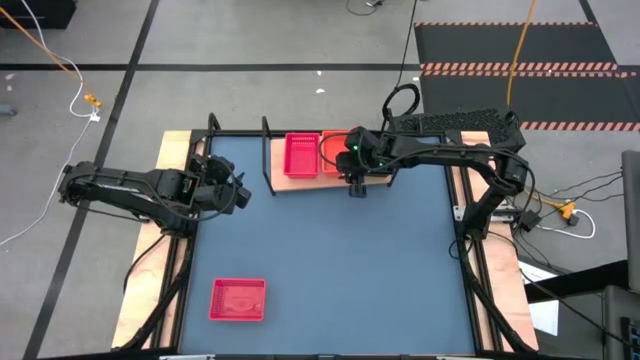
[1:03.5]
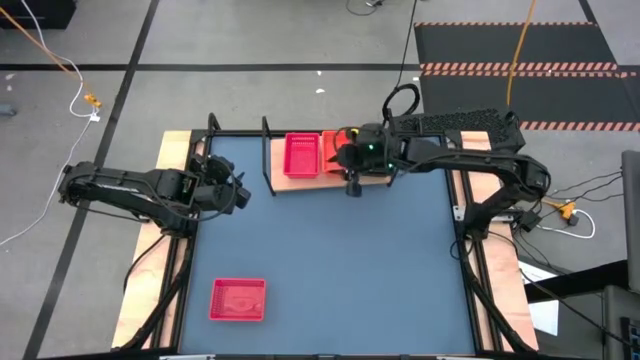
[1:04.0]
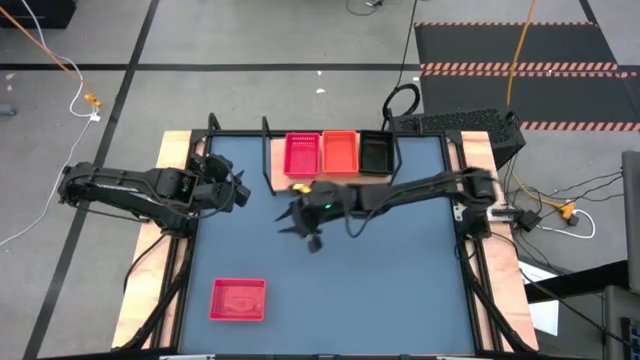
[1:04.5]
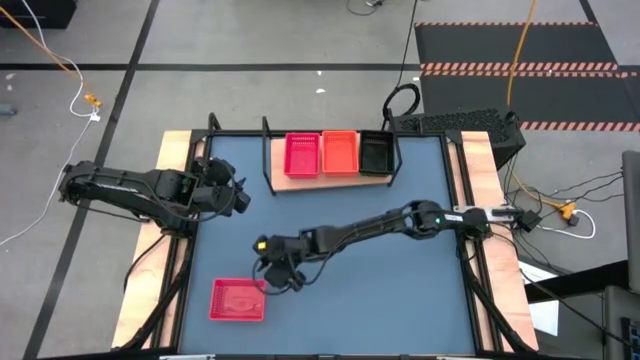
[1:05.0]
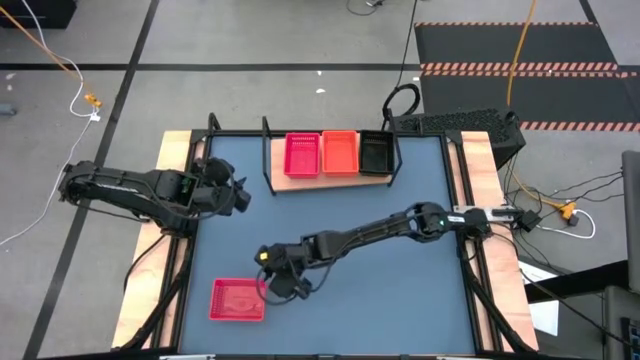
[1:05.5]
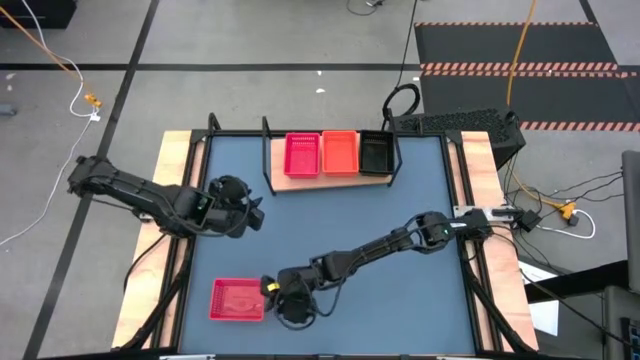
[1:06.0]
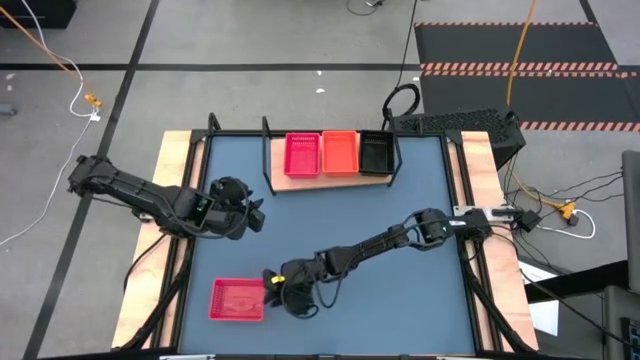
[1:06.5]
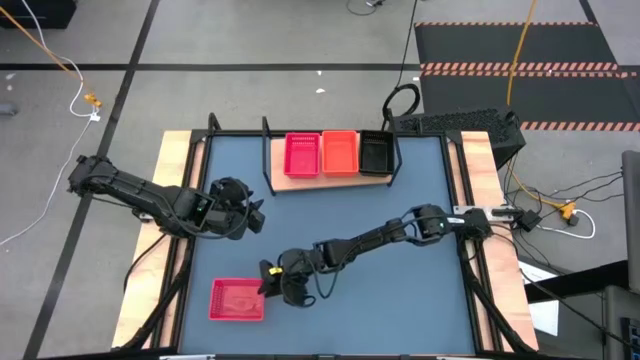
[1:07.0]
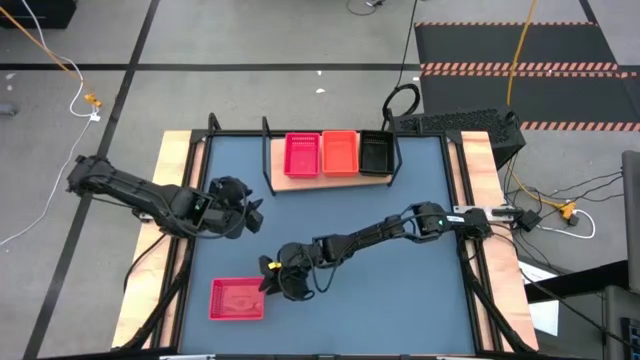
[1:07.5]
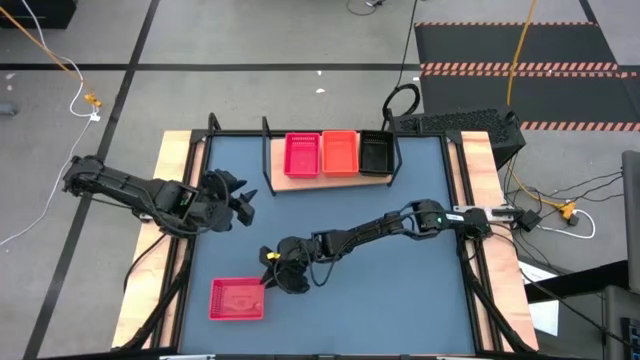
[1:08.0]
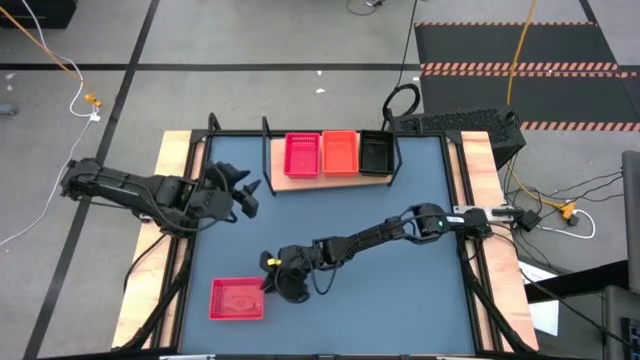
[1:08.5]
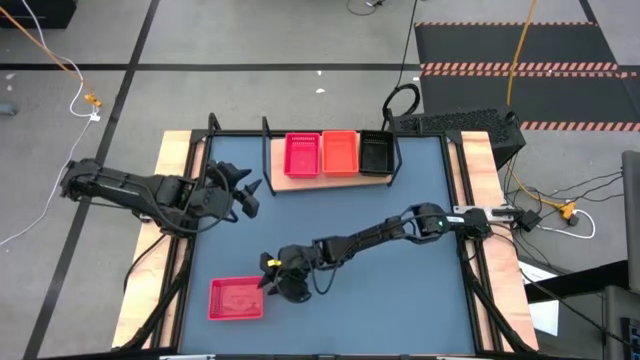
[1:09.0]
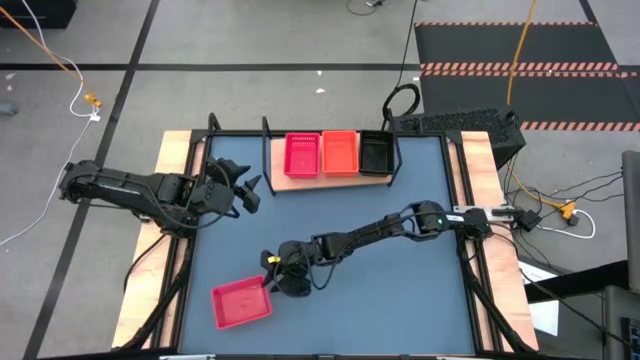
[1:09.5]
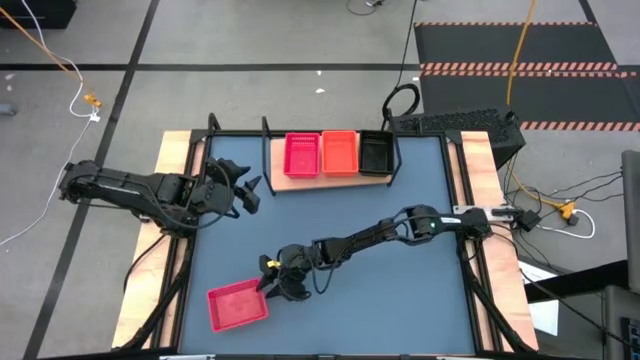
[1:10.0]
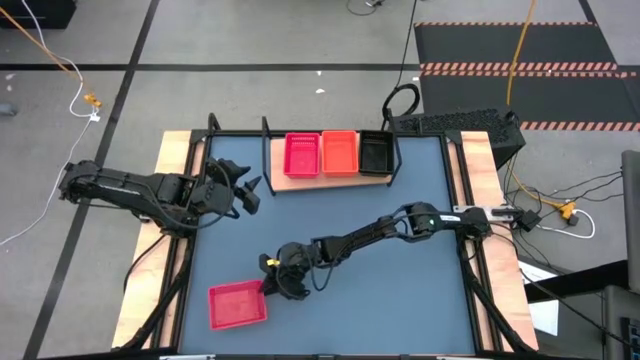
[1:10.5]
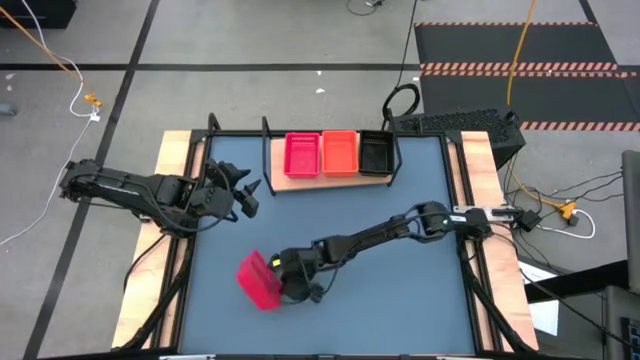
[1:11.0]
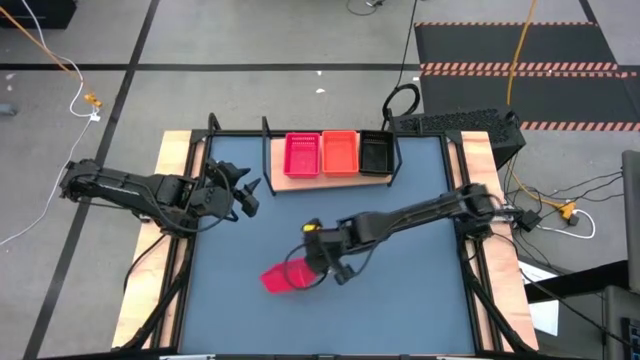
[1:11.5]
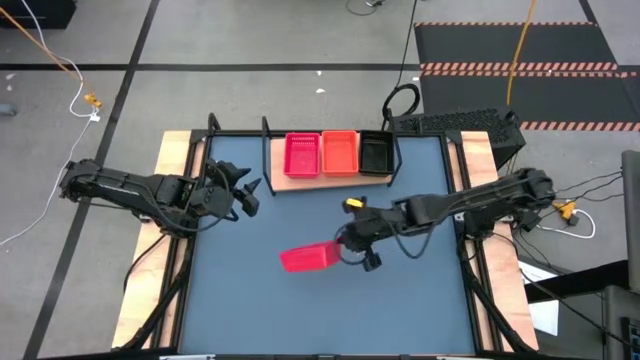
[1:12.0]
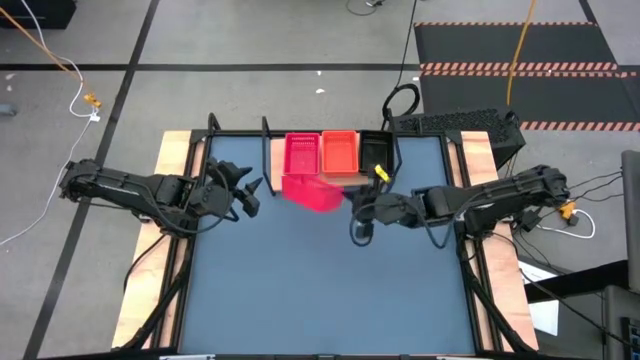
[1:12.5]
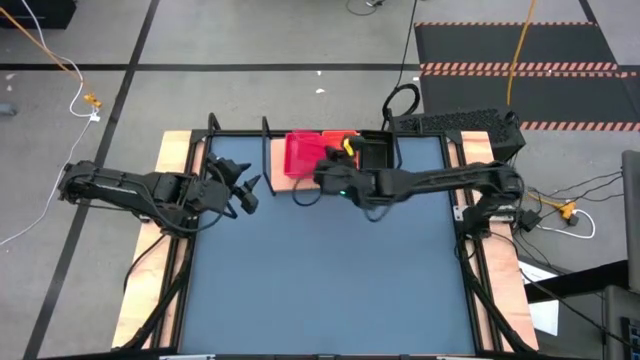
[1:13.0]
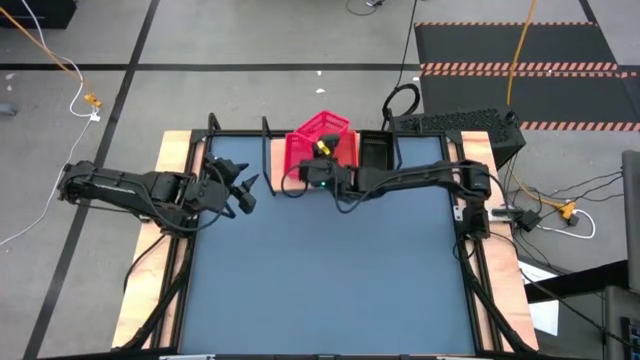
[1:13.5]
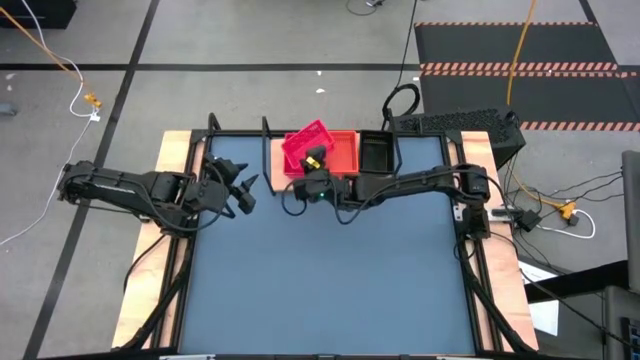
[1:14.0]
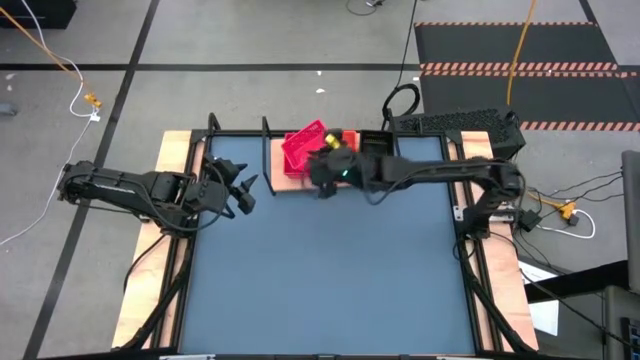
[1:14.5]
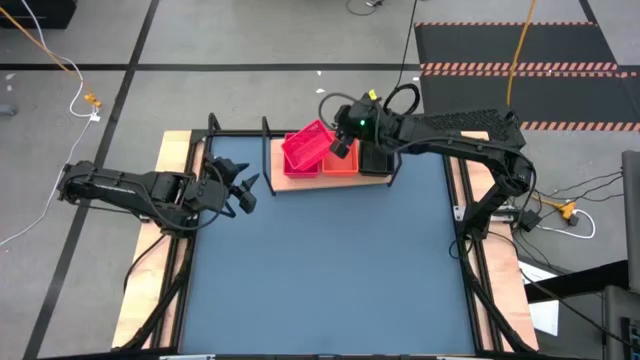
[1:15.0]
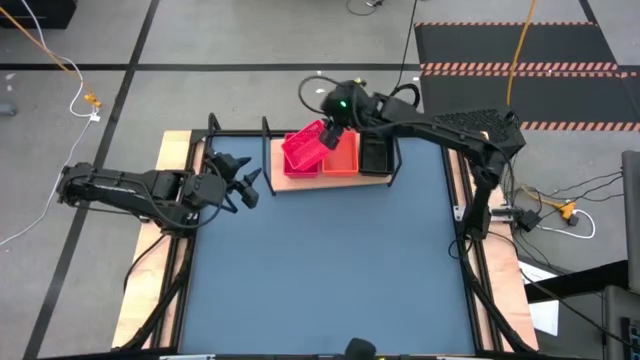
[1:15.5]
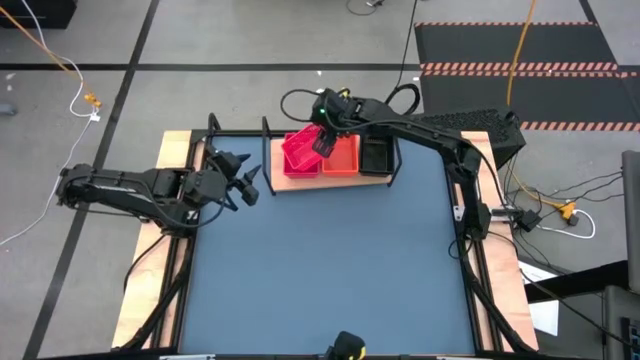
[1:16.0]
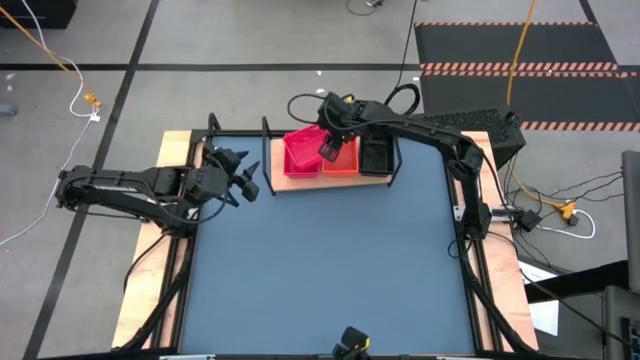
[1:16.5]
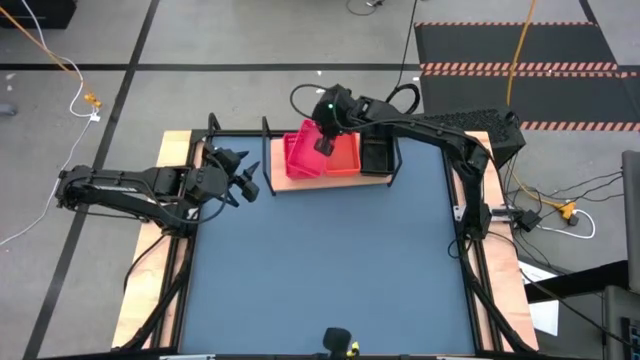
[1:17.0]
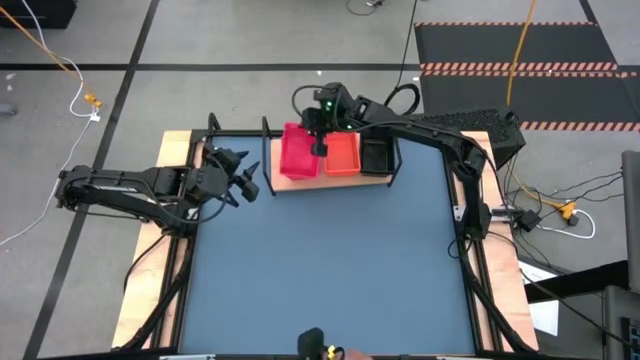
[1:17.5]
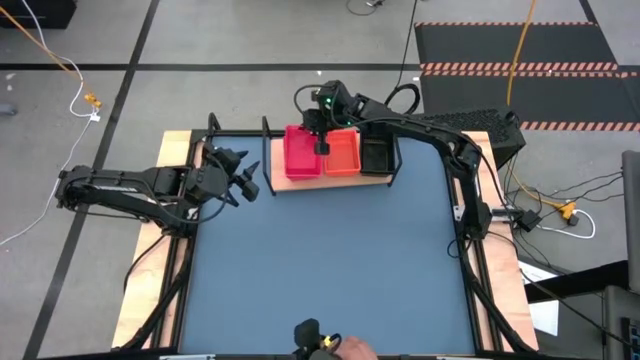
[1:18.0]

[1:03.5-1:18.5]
Task: Stack baskets on shelf by color
Stack the red bin on the red bin on the shelf

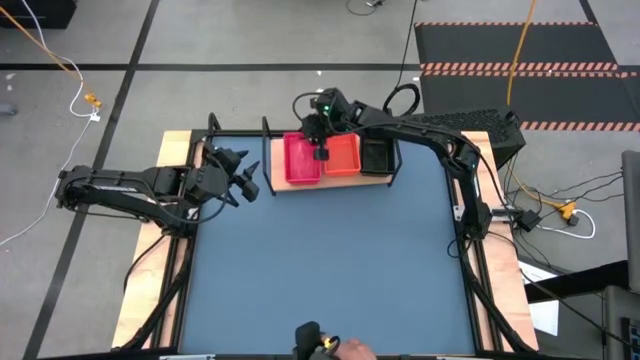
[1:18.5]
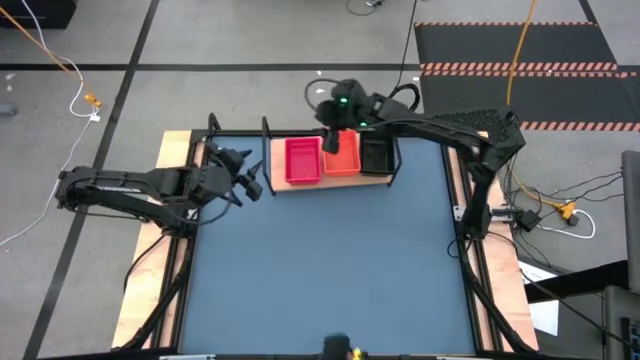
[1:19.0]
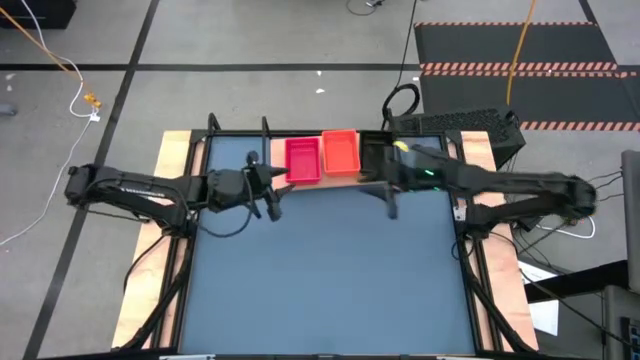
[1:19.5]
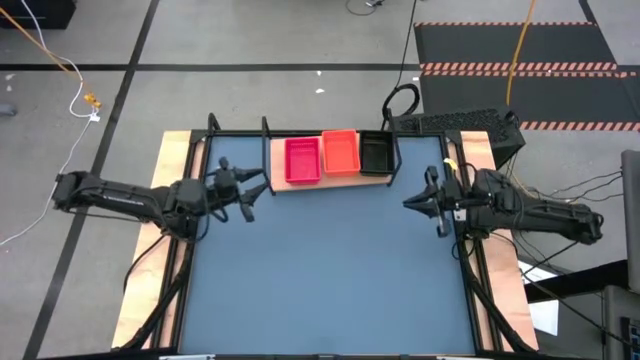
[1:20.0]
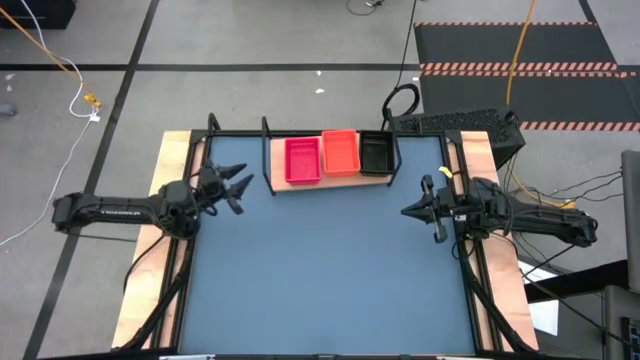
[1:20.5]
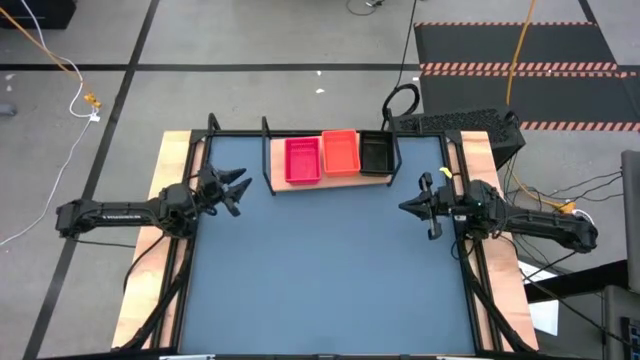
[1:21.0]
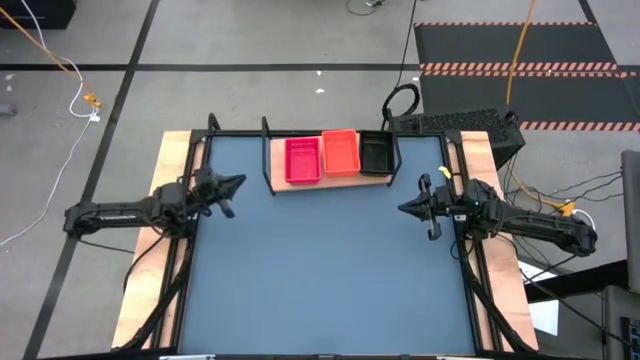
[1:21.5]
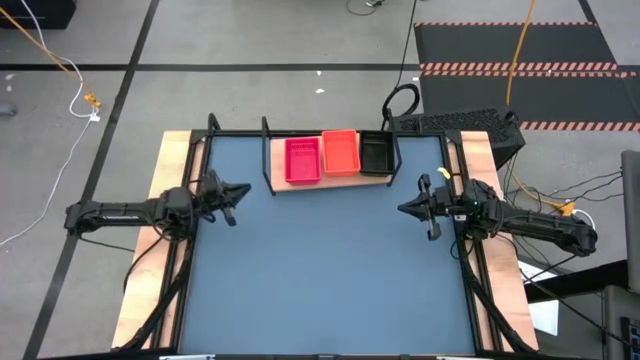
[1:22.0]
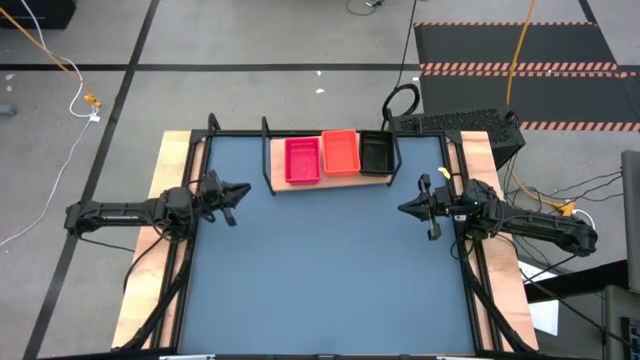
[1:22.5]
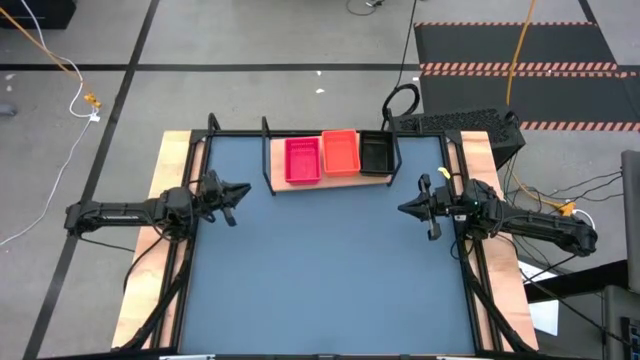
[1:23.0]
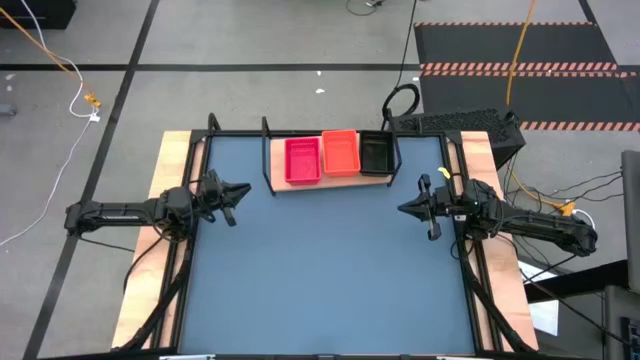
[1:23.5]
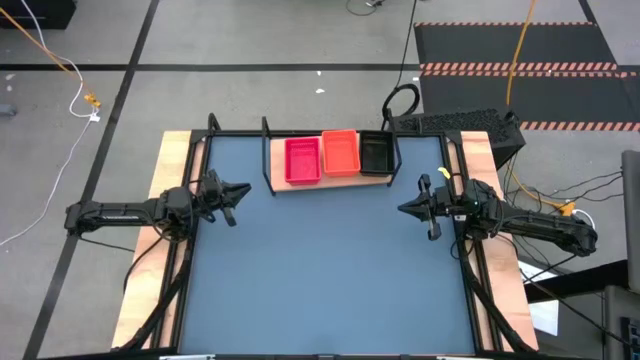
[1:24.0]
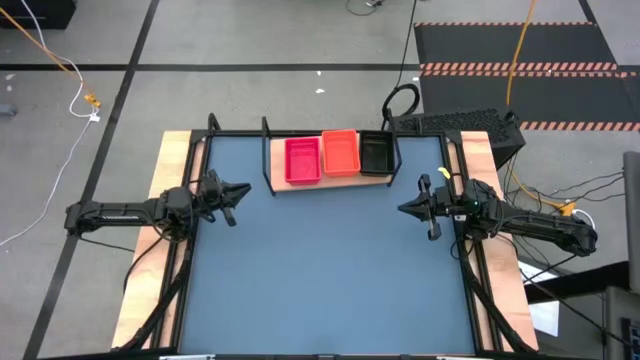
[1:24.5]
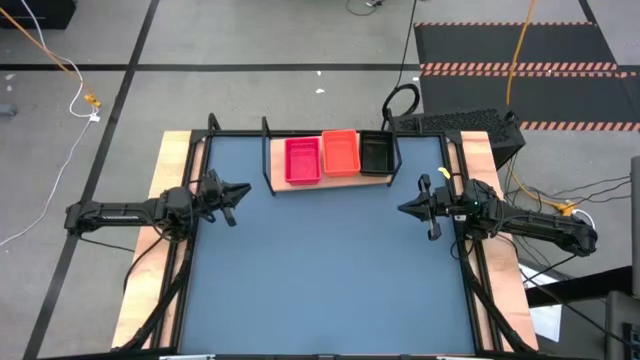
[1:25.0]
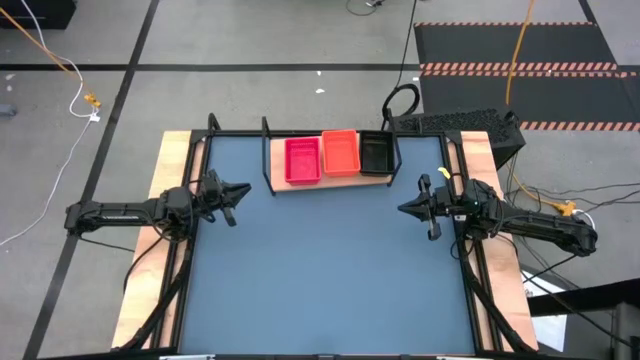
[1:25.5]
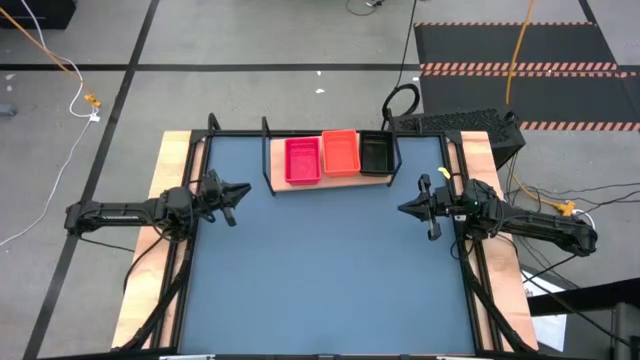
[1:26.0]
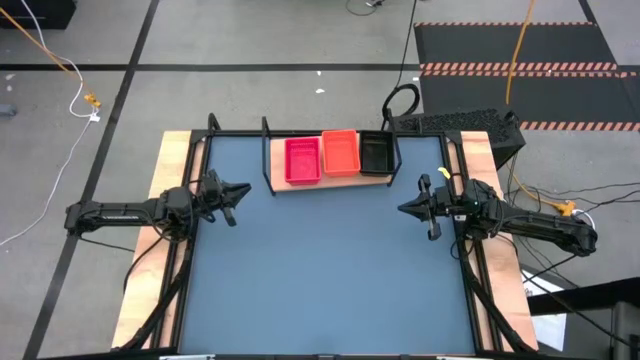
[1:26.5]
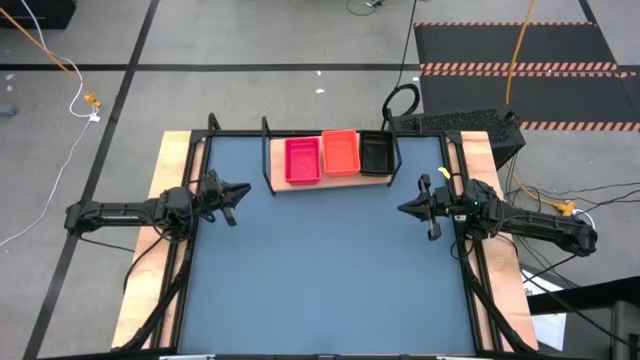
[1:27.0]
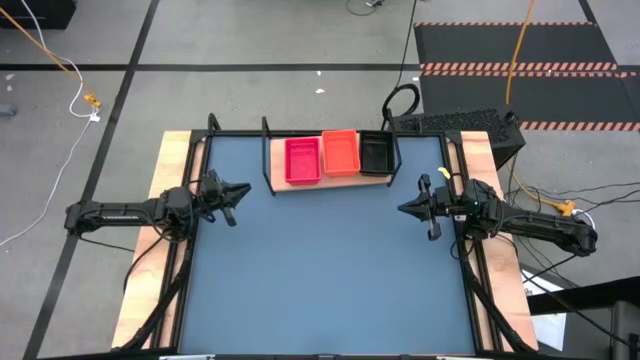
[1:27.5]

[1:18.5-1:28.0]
Return to Home Position
